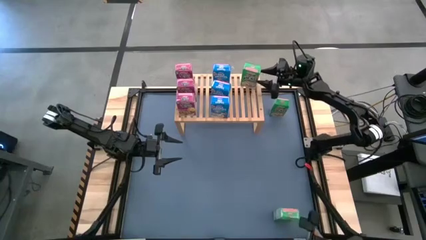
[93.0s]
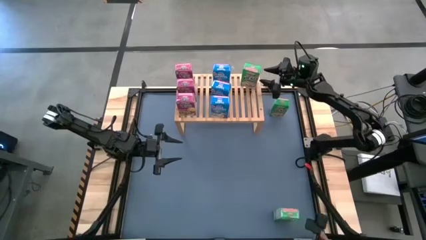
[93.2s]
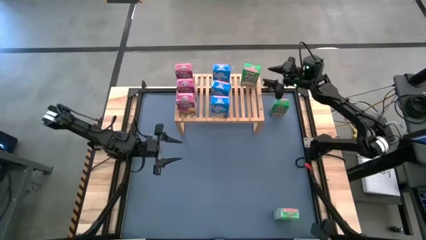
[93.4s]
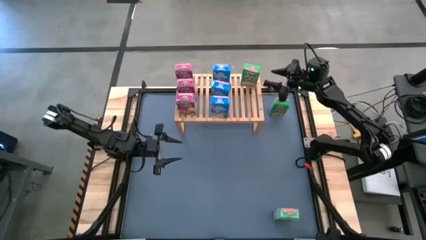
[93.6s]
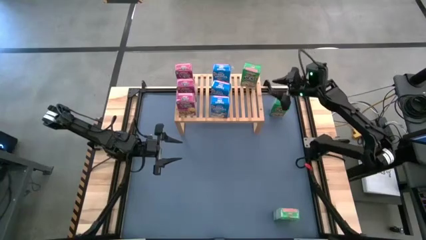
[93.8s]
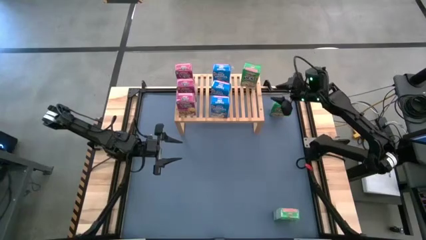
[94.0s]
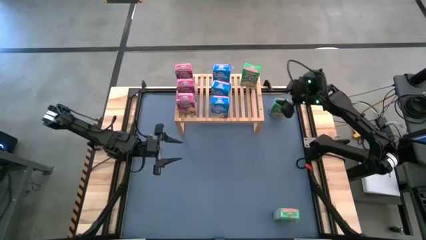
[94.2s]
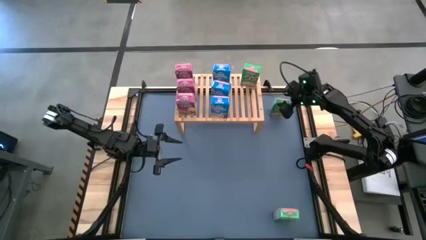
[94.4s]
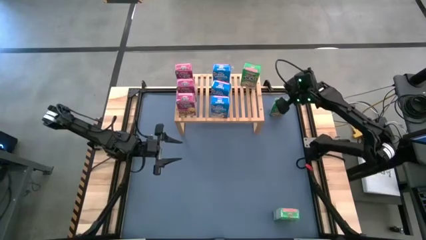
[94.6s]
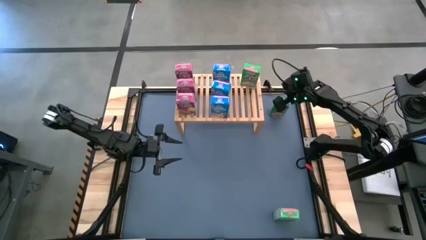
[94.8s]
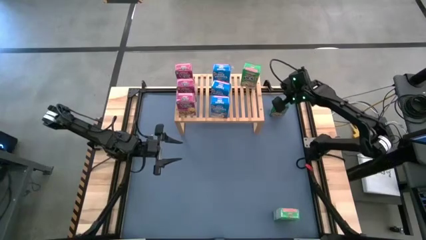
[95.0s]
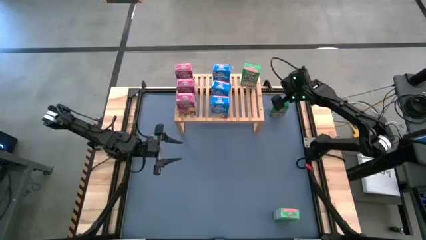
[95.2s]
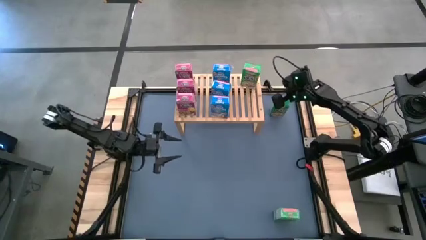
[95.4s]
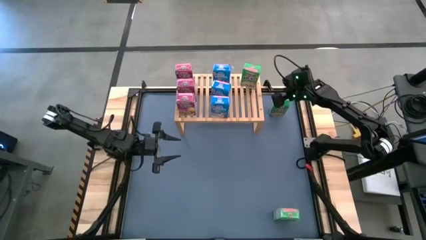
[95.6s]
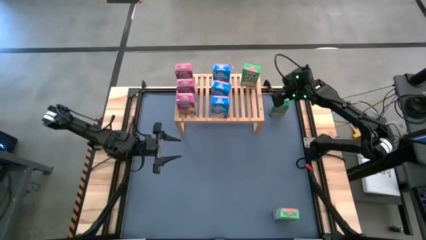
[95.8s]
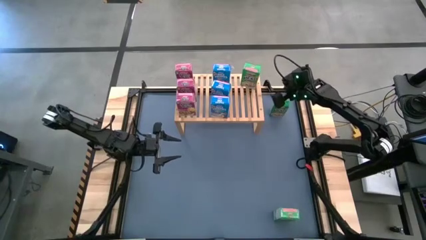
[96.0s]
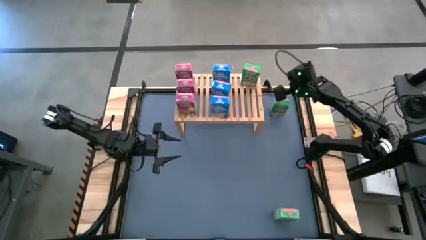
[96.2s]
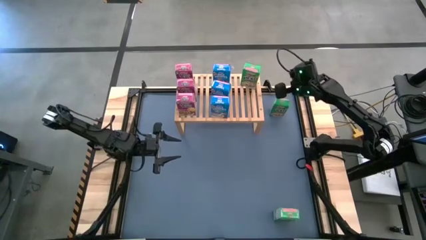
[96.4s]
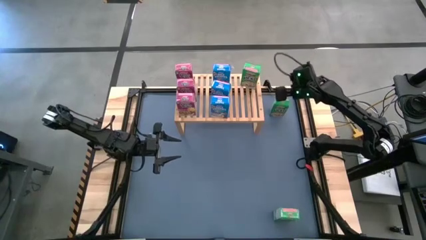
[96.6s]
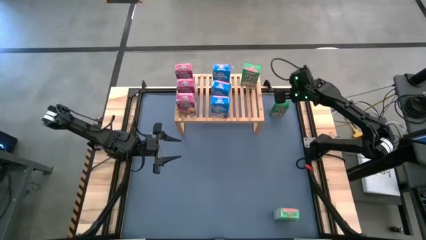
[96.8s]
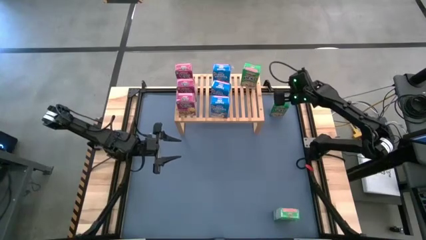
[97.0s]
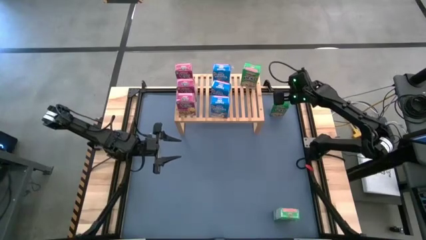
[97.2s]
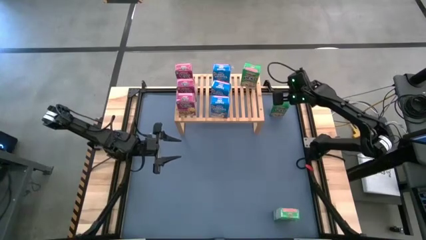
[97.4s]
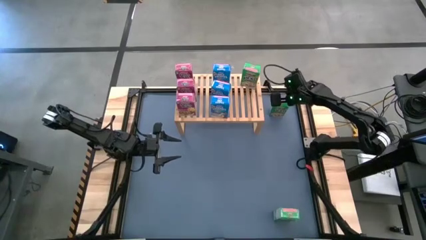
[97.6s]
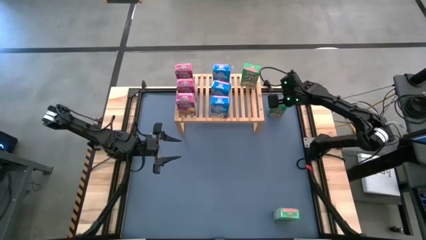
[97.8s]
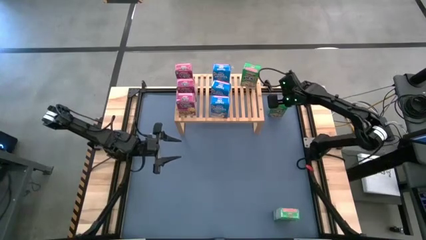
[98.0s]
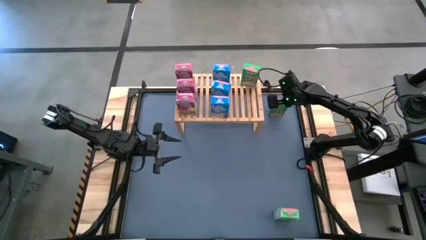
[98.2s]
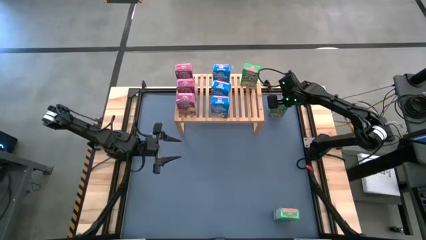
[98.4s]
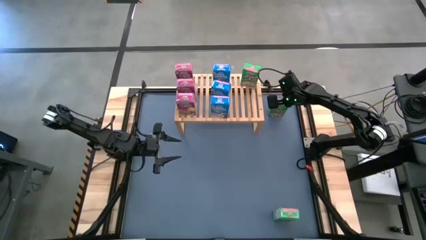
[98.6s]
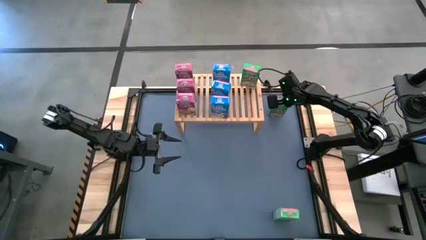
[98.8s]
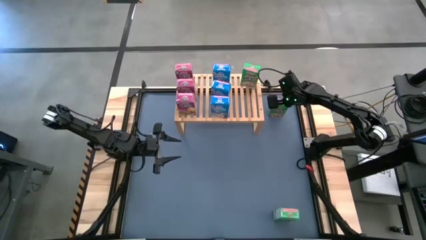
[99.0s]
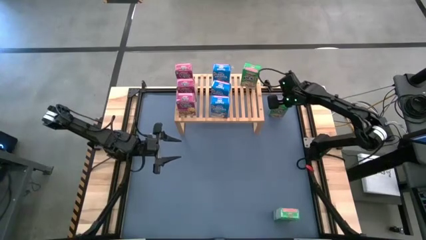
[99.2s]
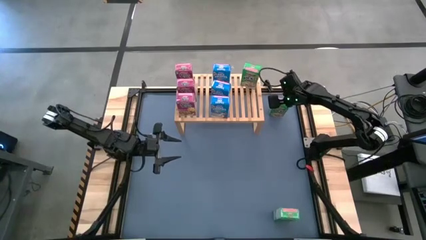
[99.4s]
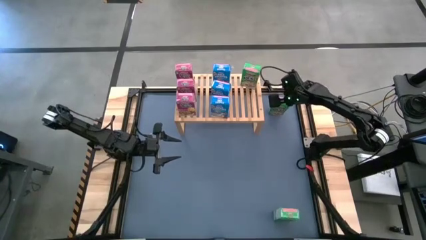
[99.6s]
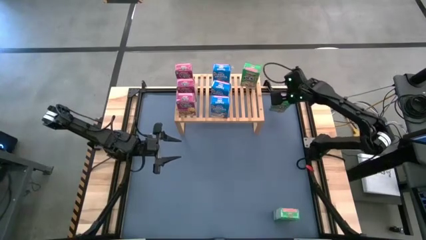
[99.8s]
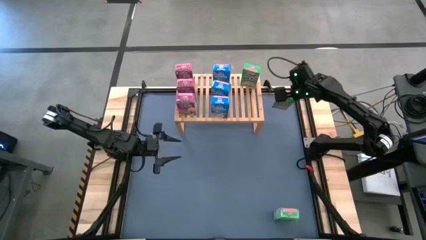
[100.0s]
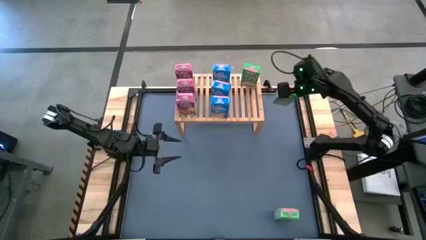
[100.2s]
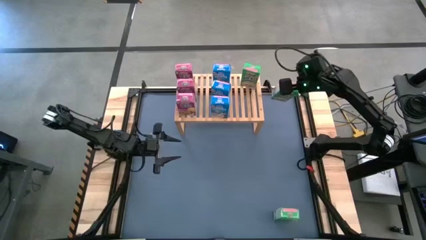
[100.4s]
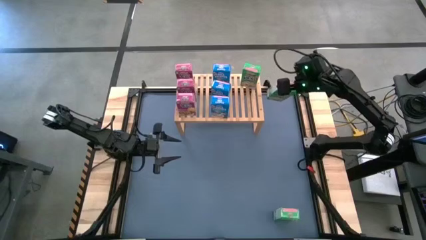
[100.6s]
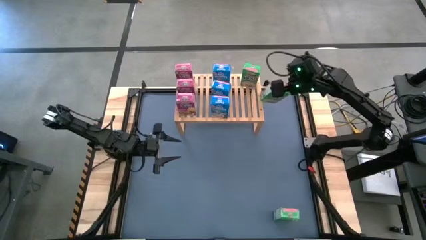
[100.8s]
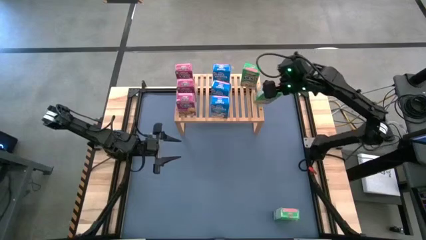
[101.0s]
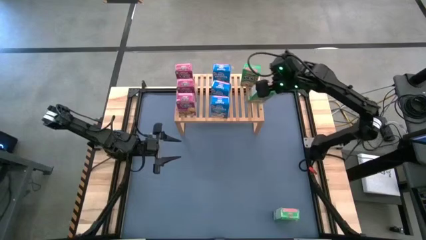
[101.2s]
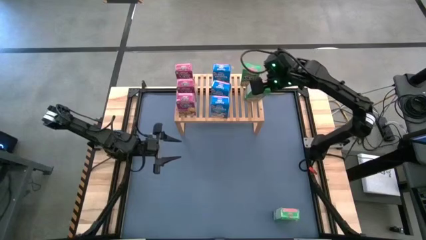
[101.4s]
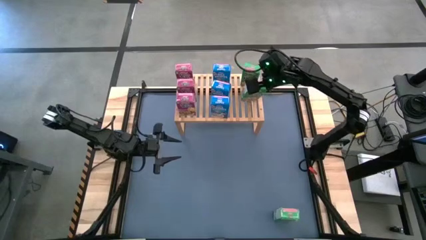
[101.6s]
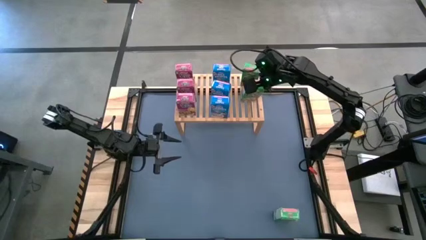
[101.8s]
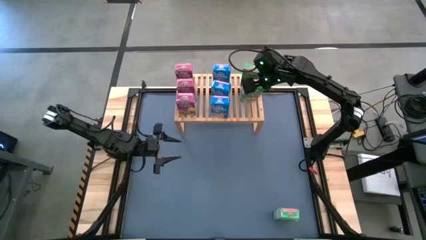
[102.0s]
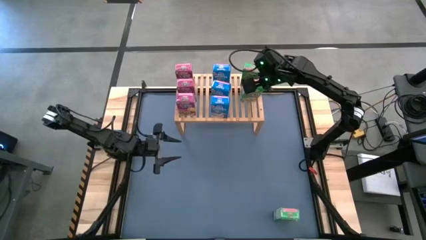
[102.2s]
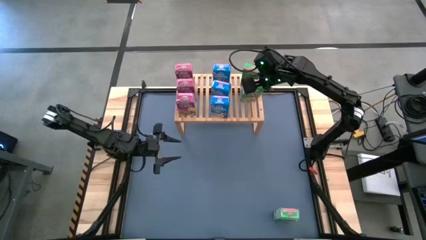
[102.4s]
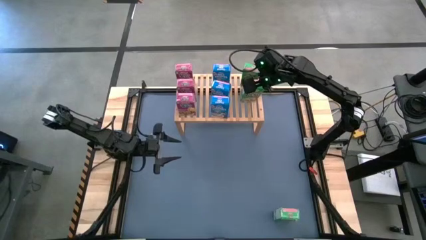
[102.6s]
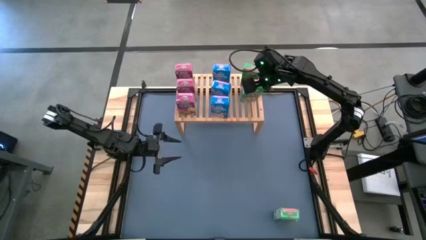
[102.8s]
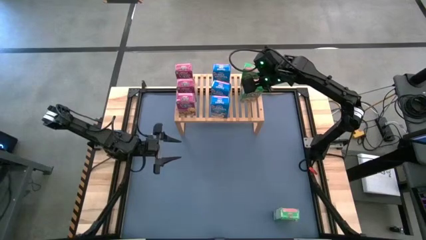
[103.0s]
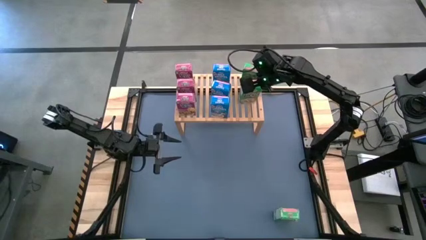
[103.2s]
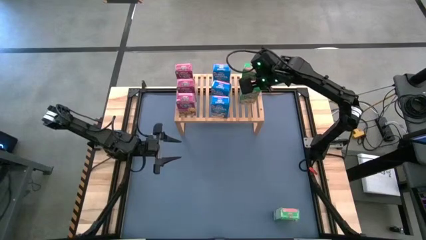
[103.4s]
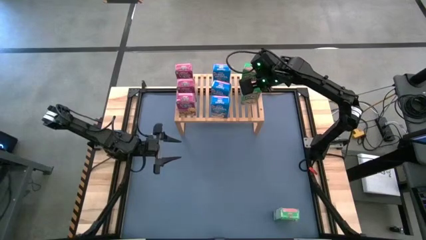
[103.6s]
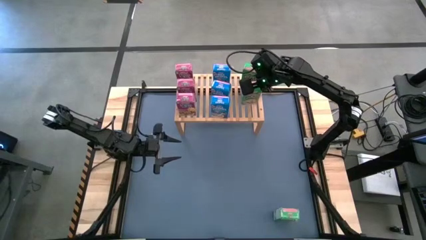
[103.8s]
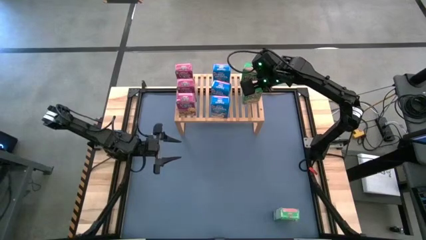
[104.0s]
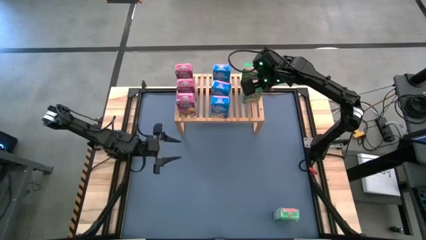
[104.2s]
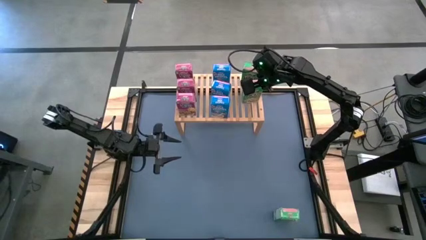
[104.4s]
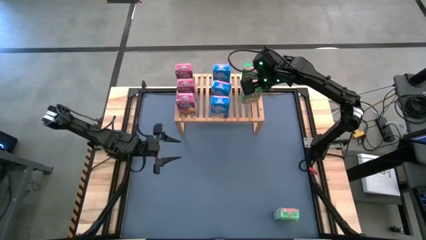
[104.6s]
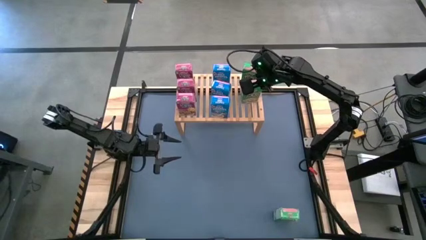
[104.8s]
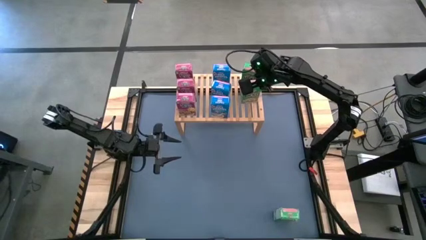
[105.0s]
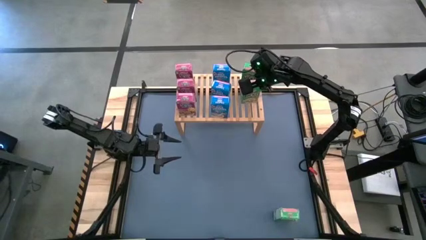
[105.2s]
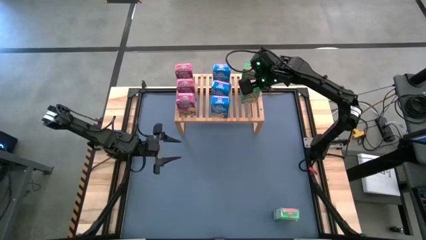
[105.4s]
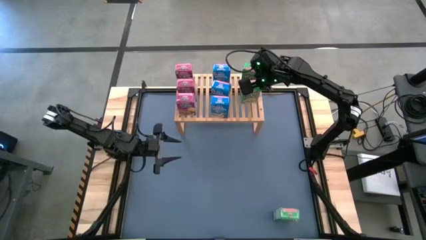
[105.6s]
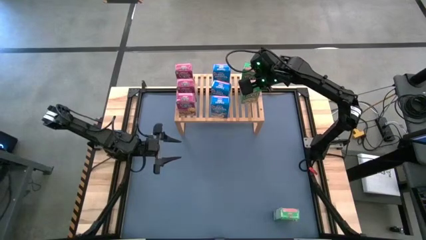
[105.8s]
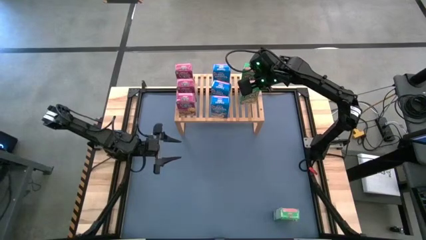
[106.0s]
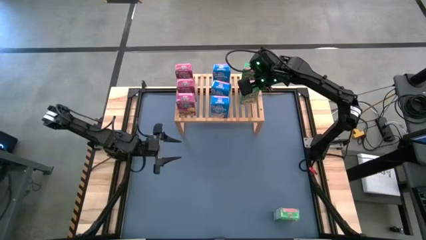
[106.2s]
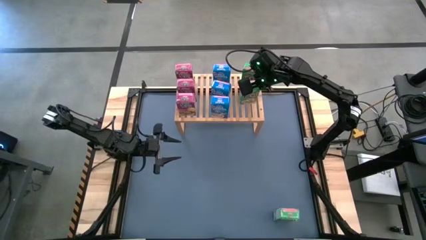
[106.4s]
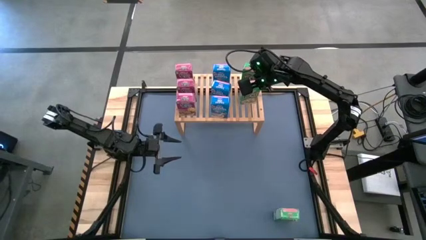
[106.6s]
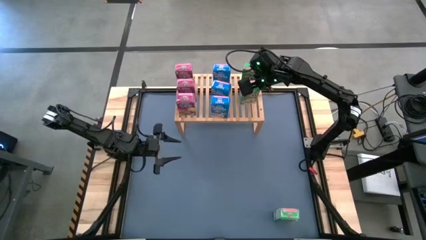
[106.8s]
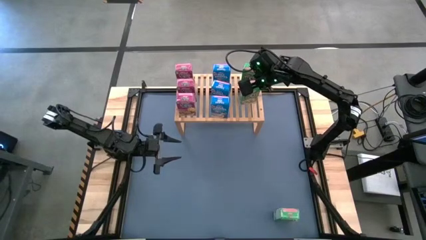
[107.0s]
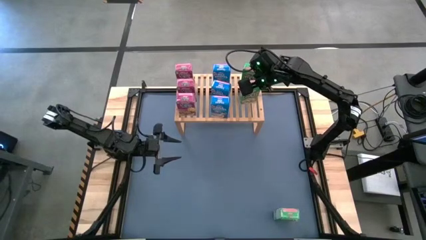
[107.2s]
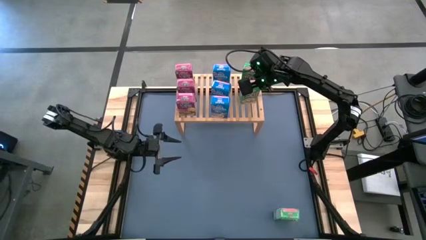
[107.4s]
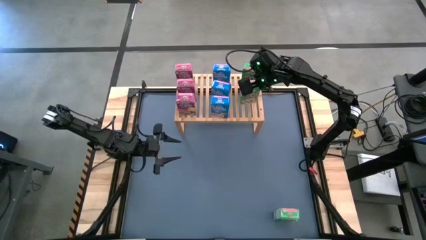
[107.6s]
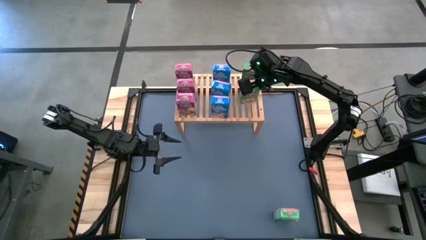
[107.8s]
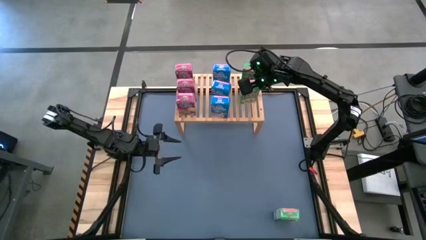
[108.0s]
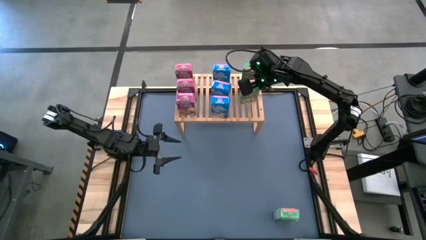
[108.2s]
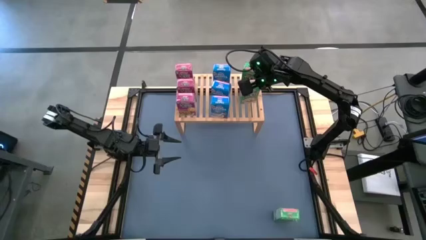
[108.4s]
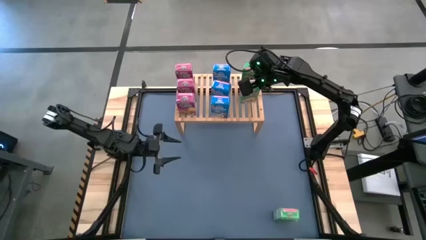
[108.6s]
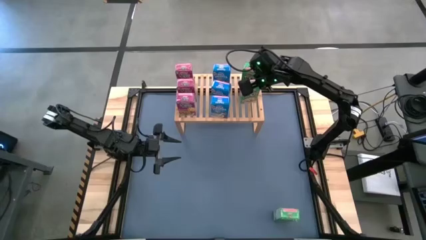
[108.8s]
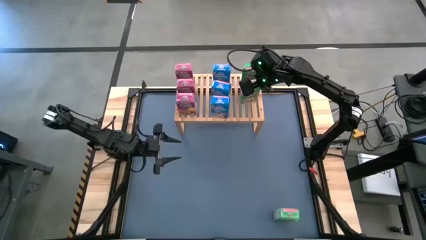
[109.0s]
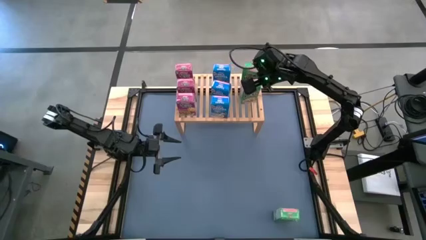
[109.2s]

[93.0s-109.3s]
Task: Stack cereal on shelf
Put the top green cereal box on the shelf aligned with the other green cereal box
